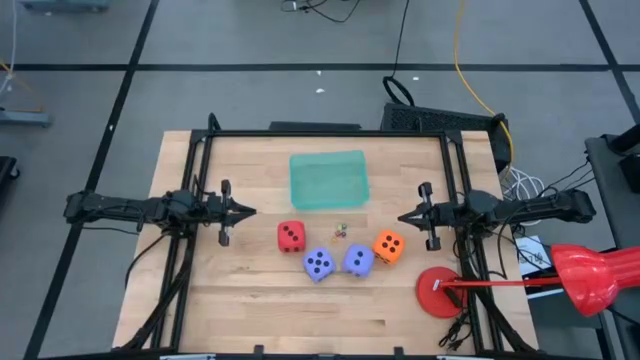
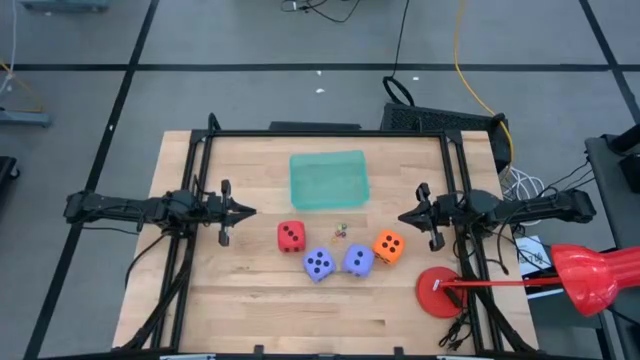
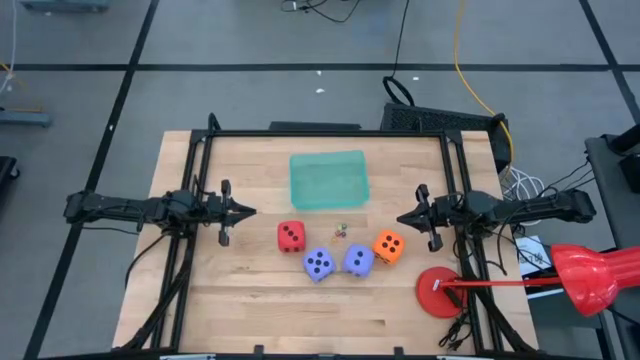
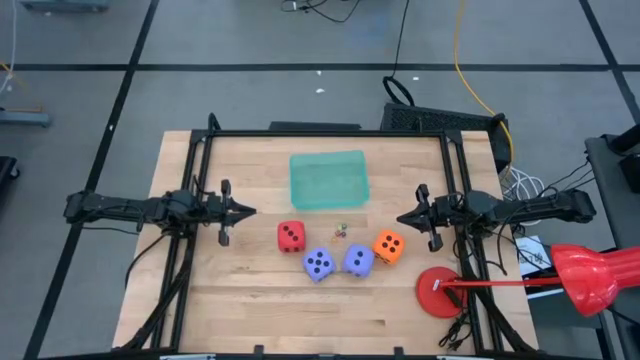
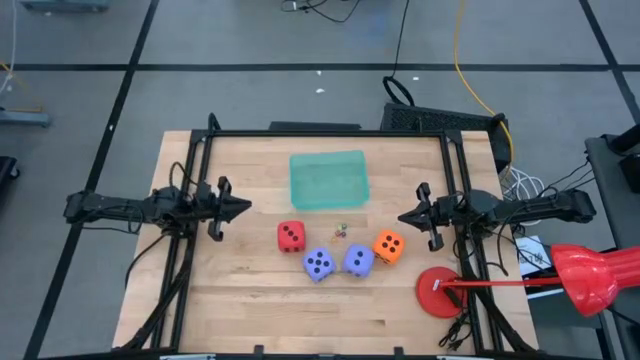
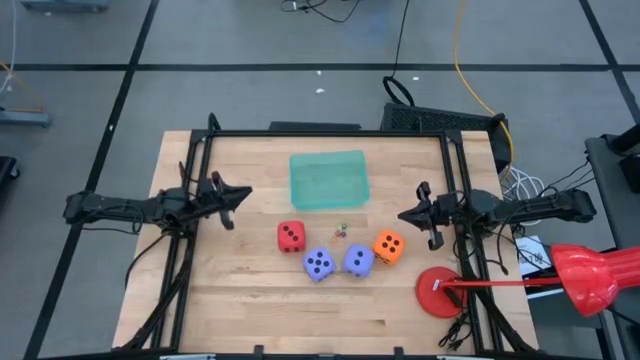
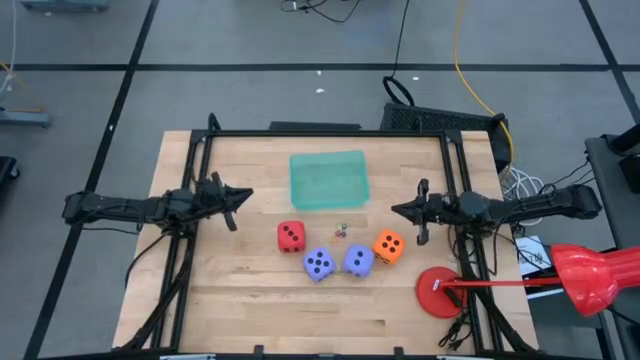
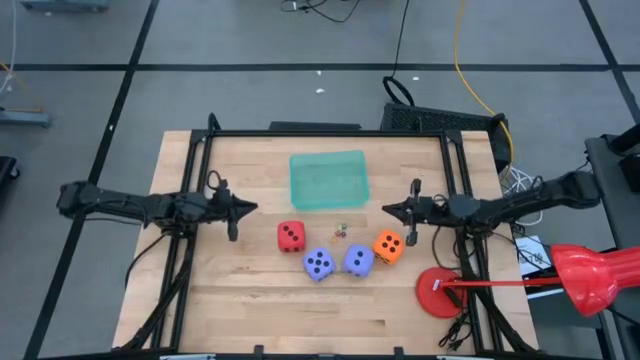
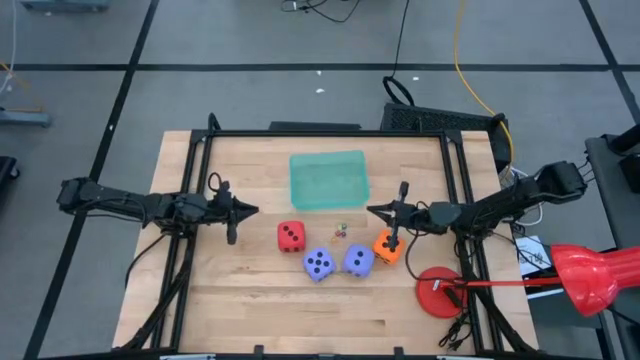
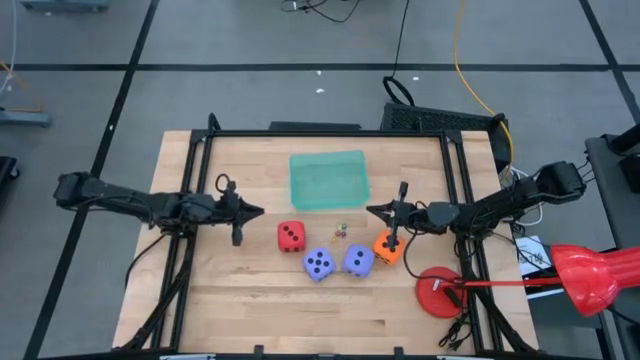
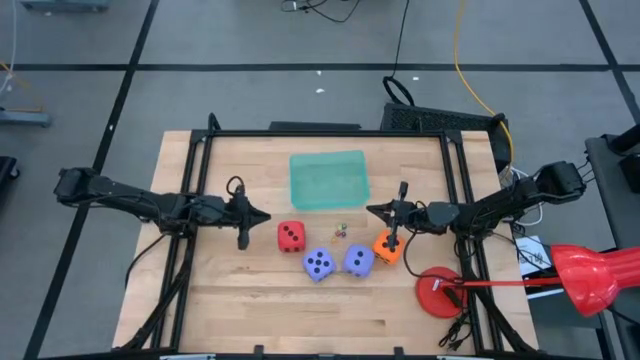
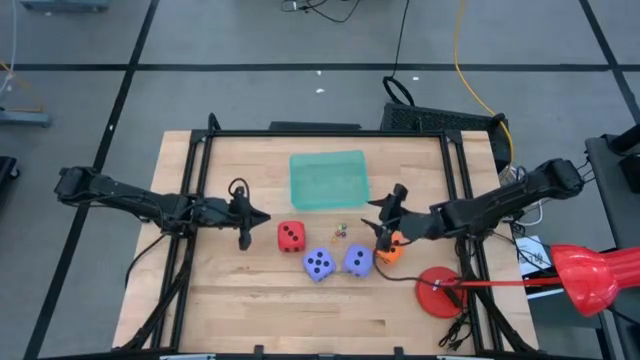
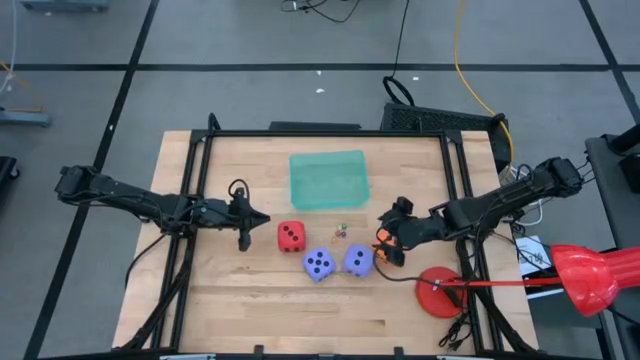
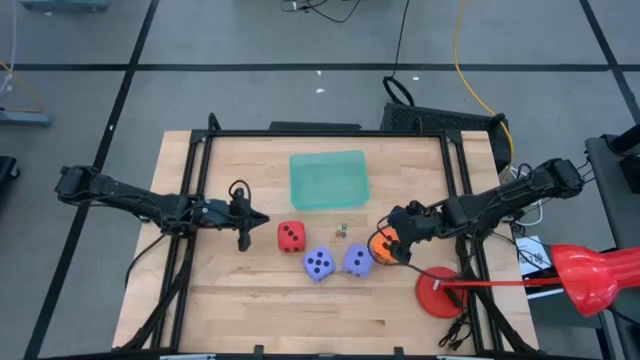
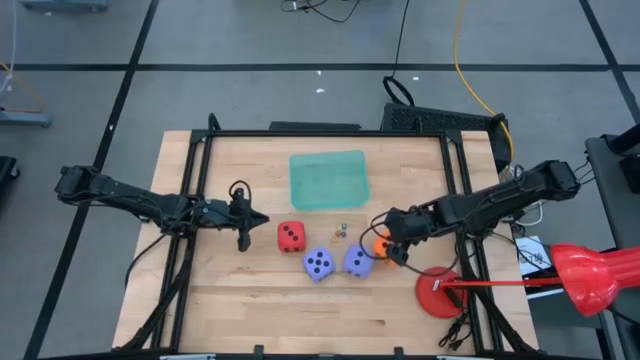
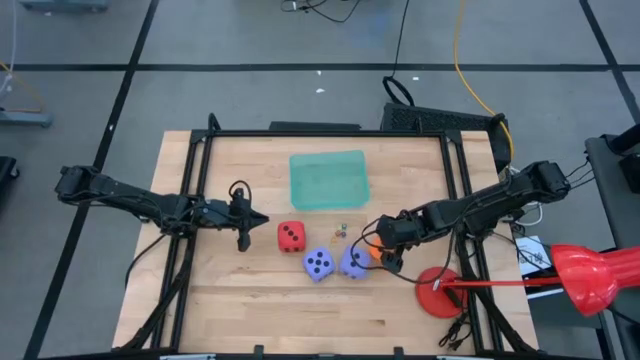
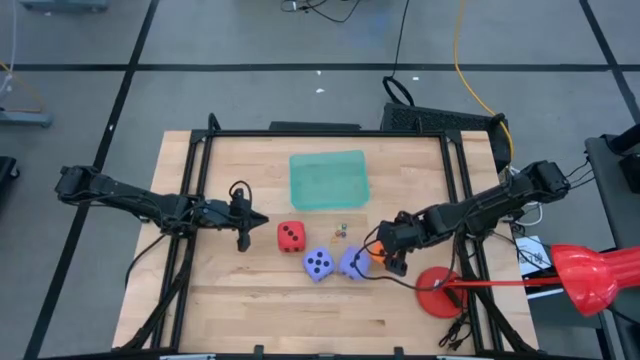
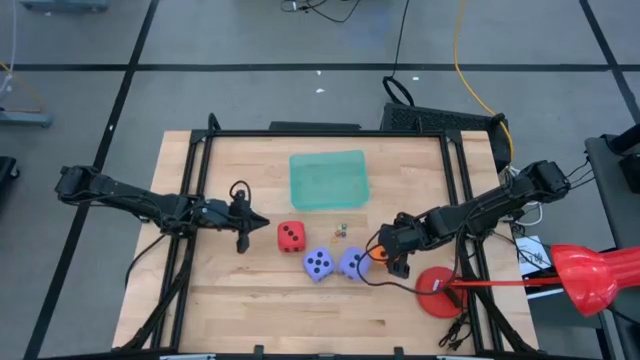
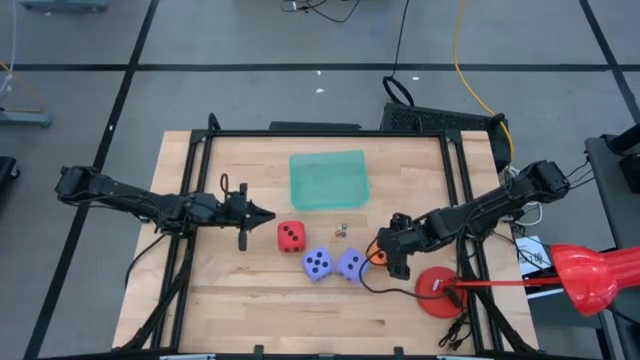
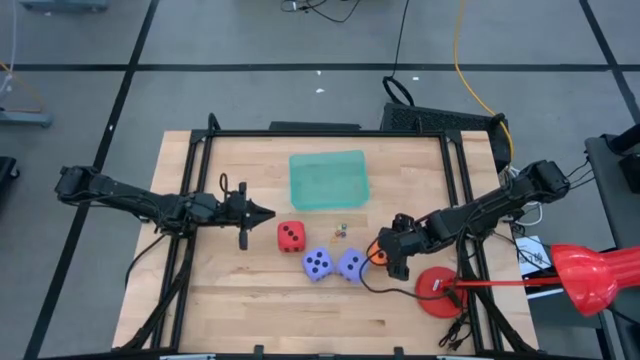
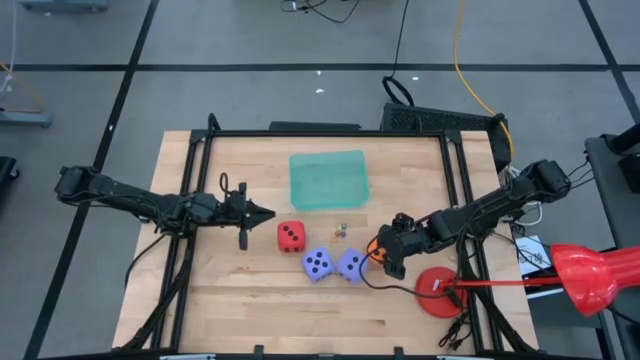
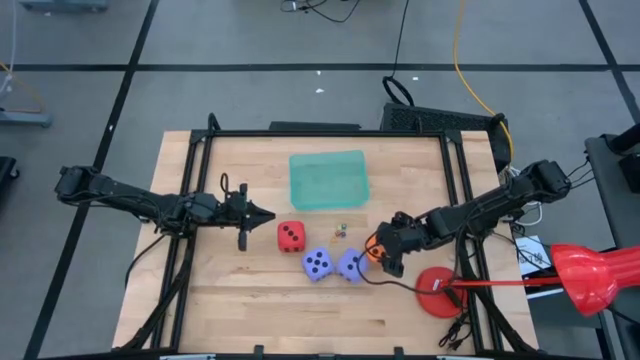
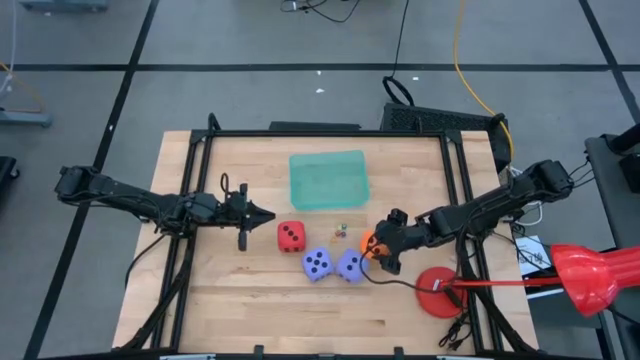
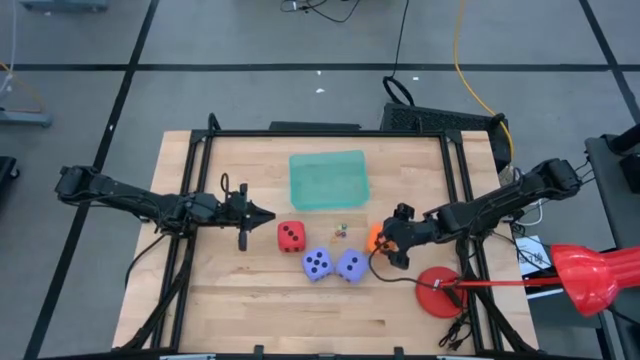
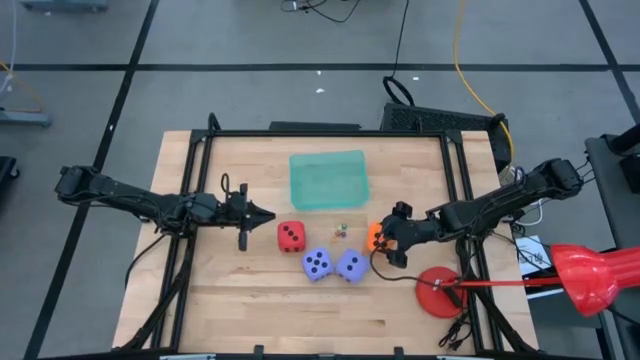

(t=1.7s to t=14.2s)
Task: Pick & Place Dice
Put the large orange dice into the basket

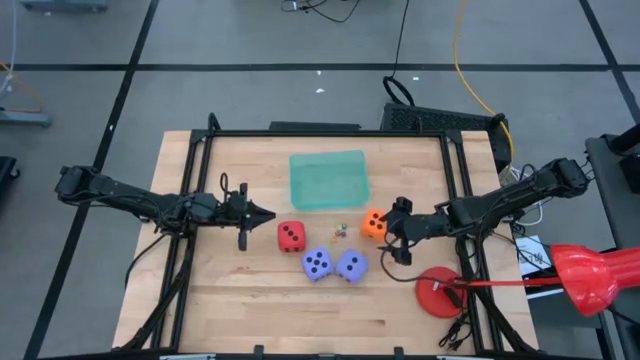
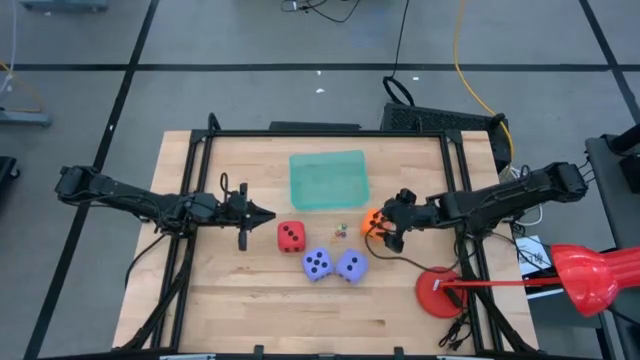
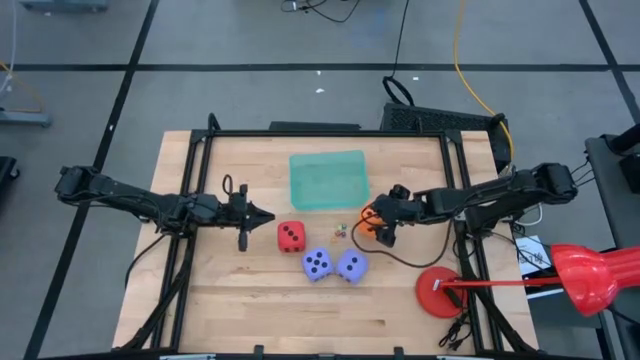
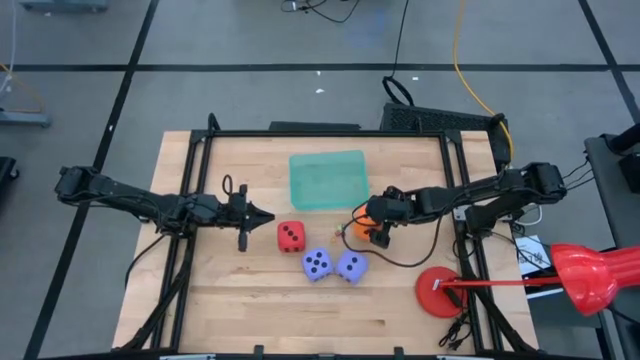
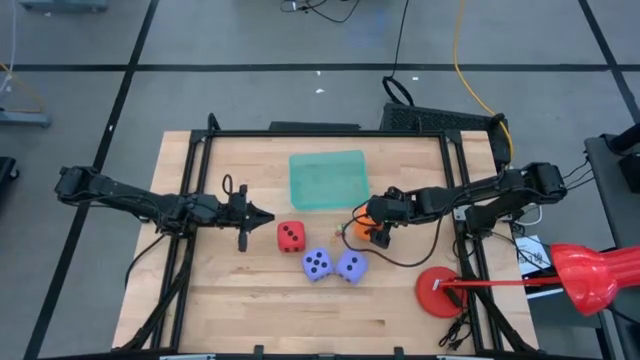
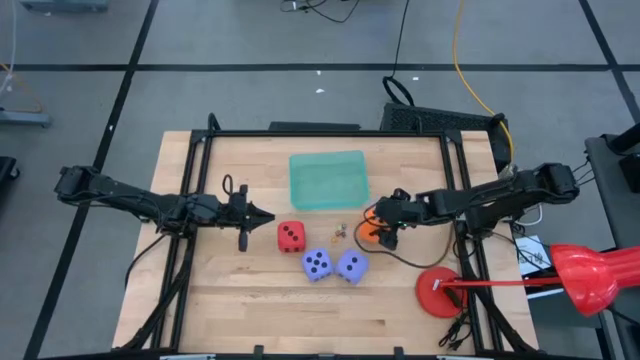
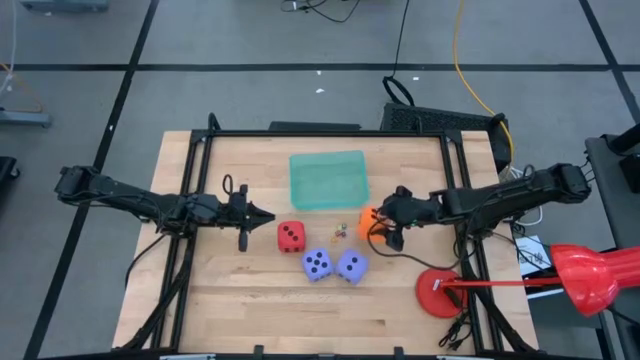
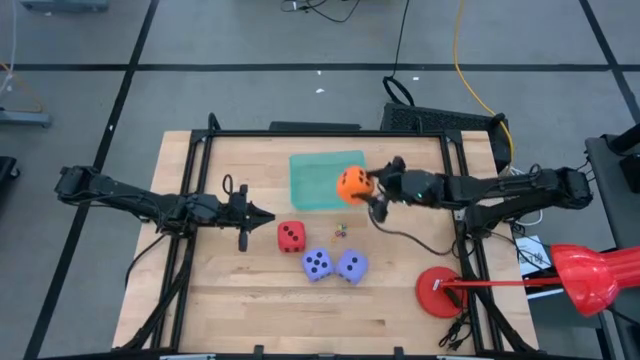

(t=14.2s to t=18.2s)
Put the right large orange dice into the basket

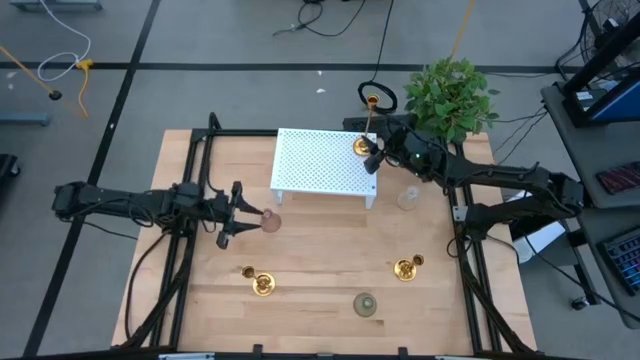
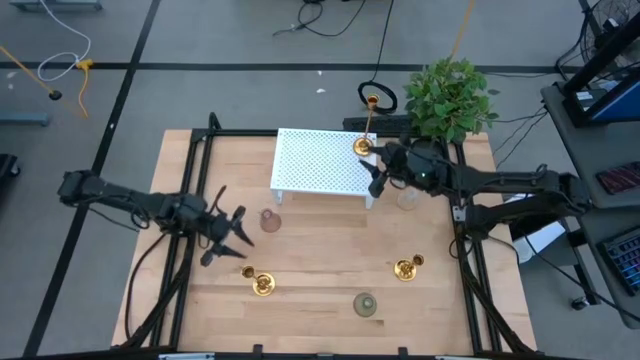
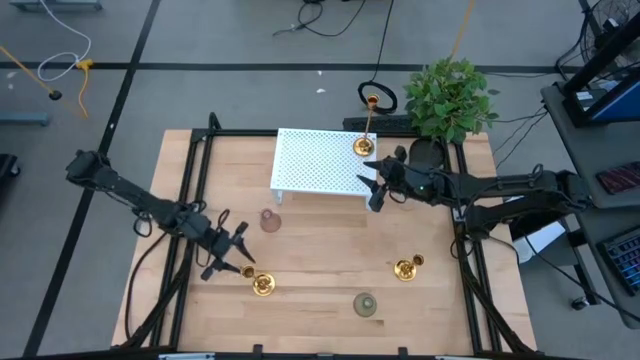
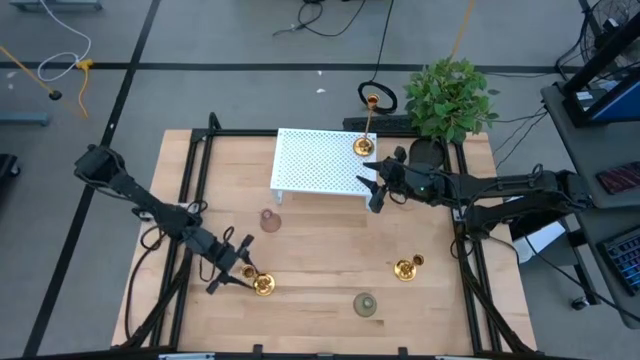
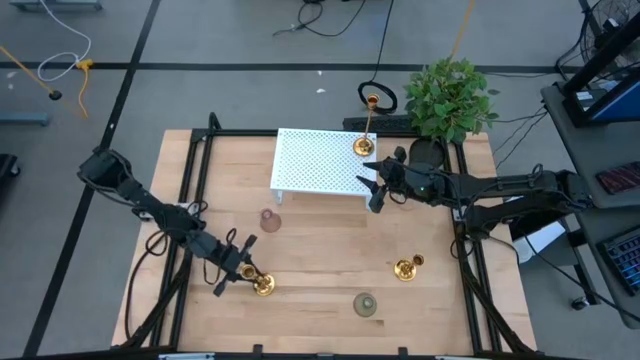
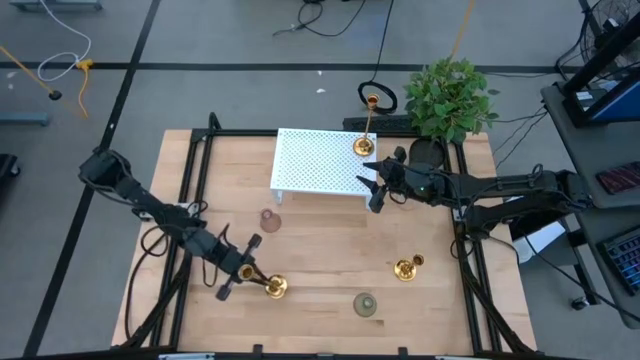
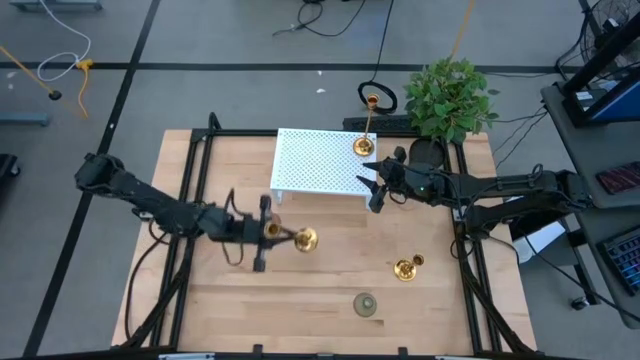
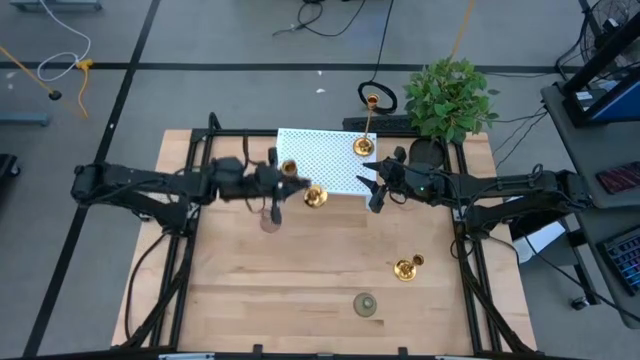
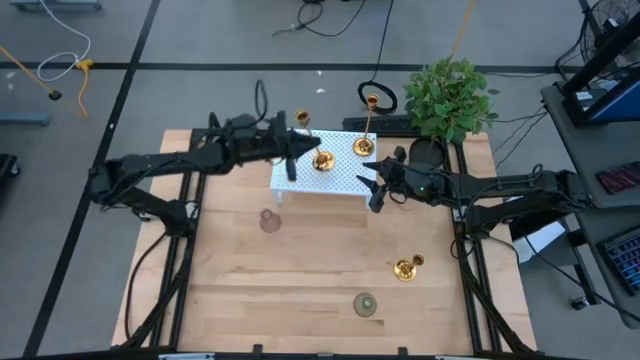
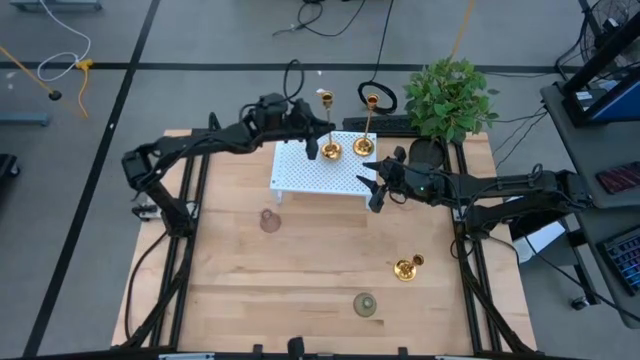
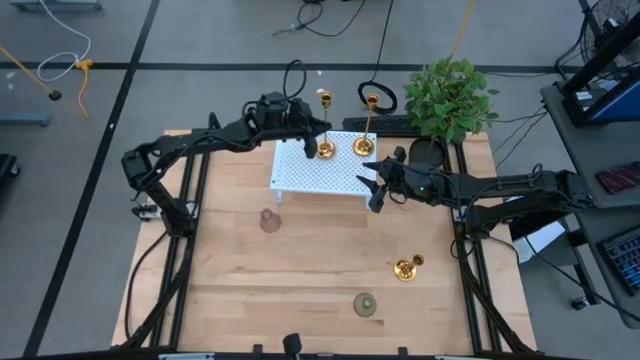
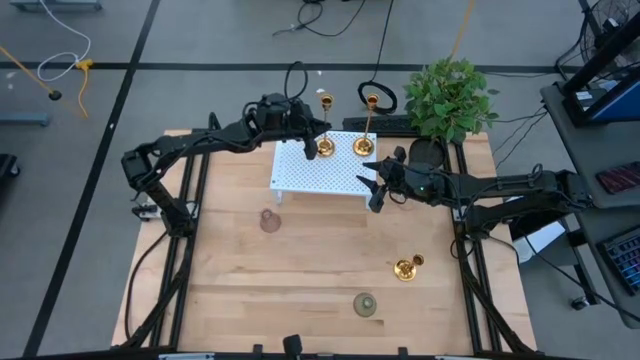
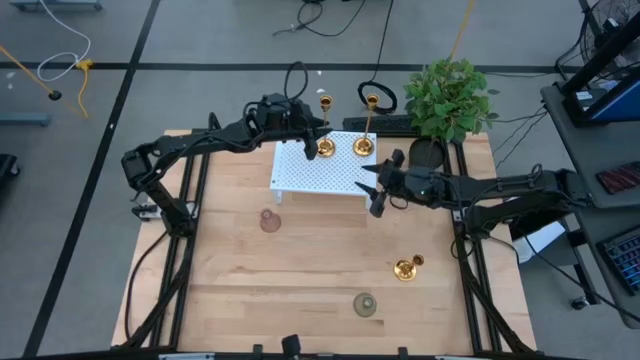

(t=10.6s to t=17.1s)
Task: Pick & Place candle stick holders
Put the long gold candle holder on the shelf
